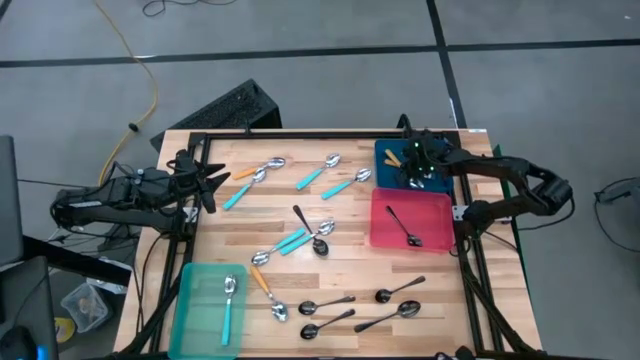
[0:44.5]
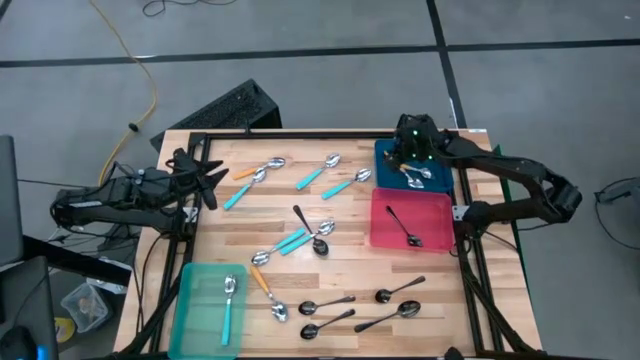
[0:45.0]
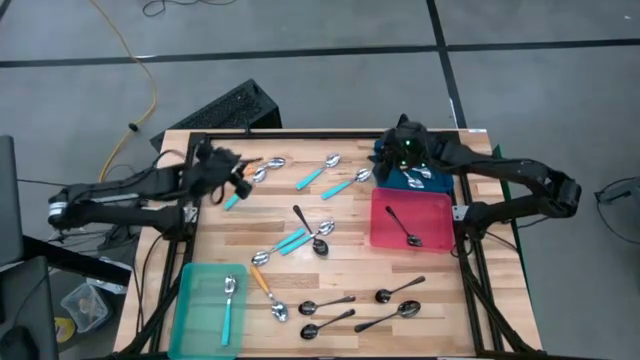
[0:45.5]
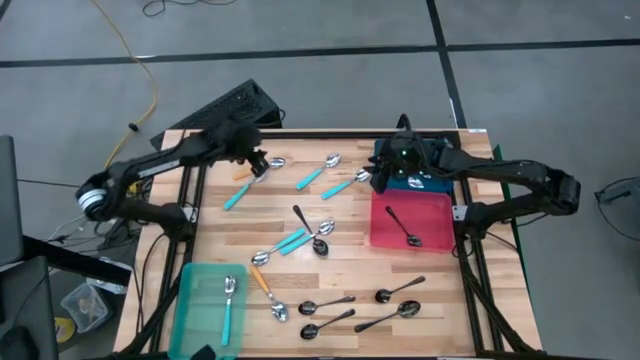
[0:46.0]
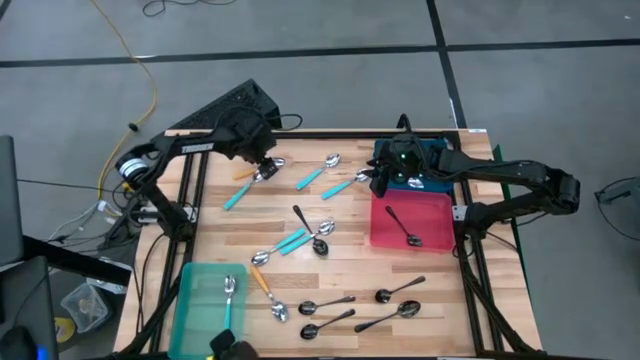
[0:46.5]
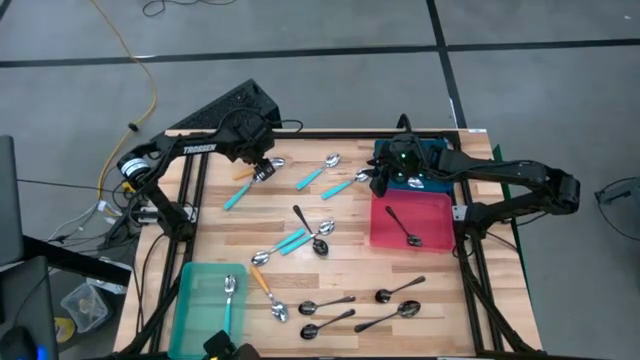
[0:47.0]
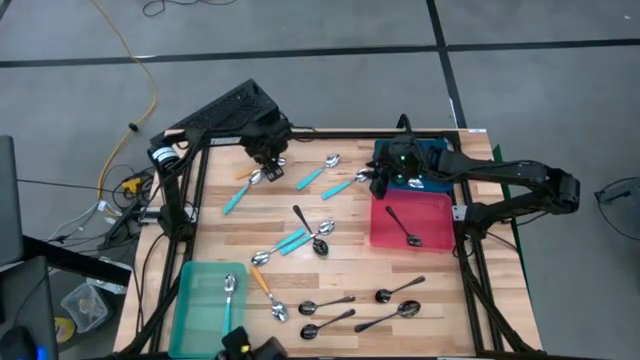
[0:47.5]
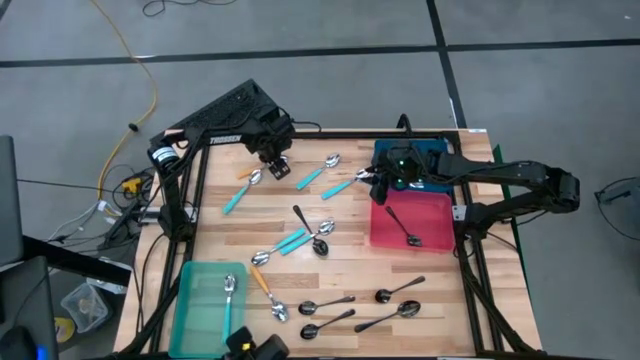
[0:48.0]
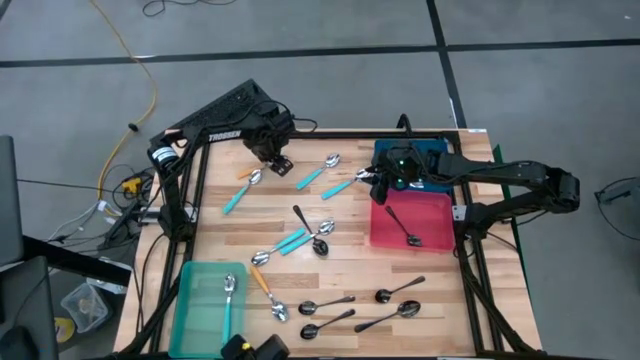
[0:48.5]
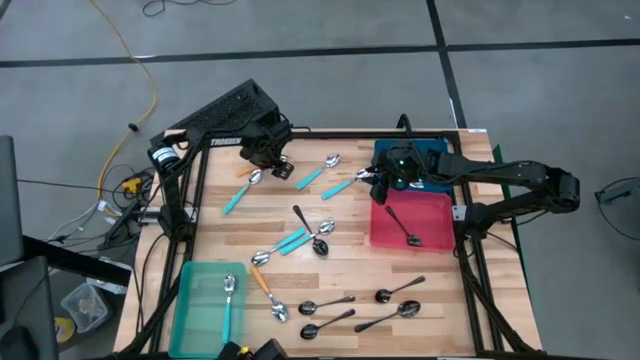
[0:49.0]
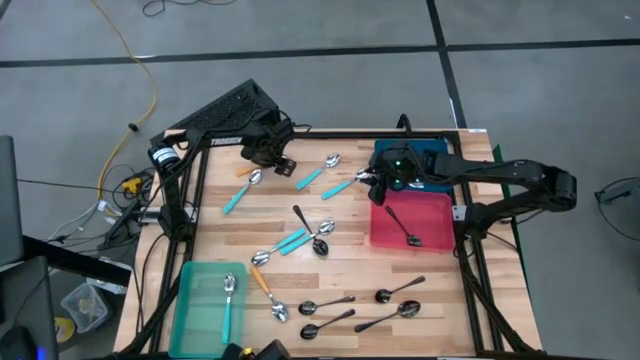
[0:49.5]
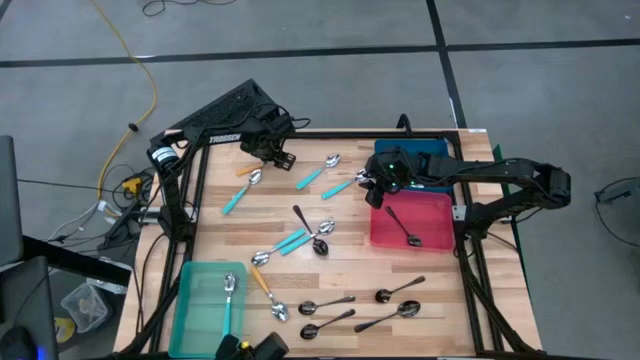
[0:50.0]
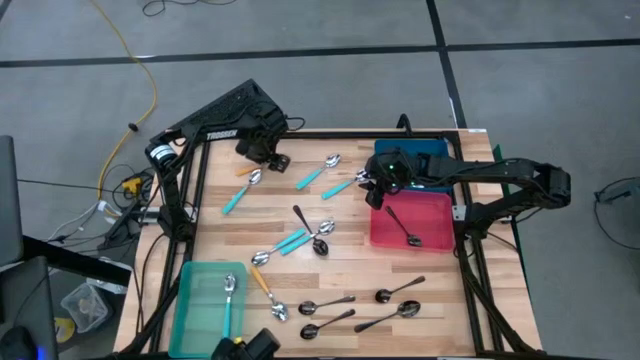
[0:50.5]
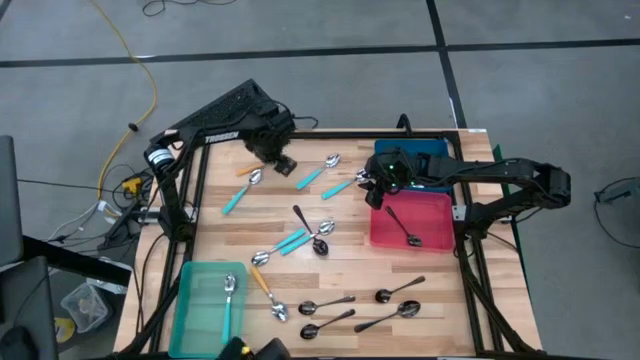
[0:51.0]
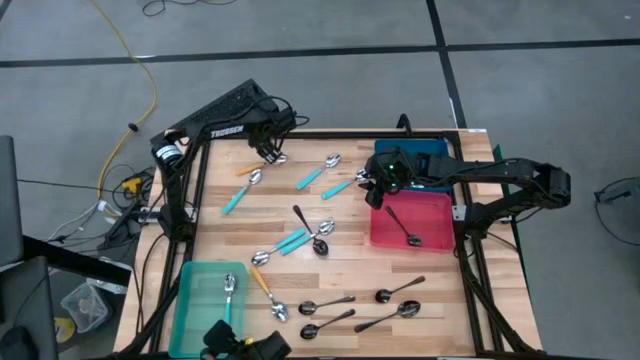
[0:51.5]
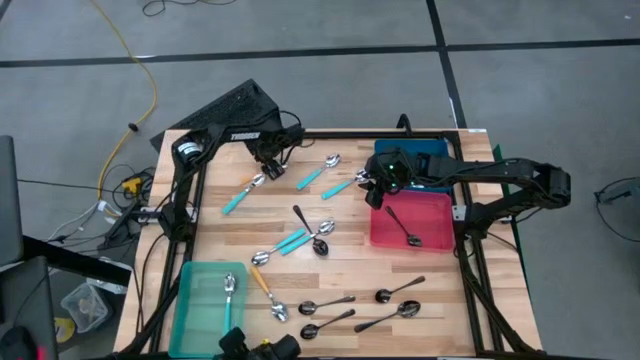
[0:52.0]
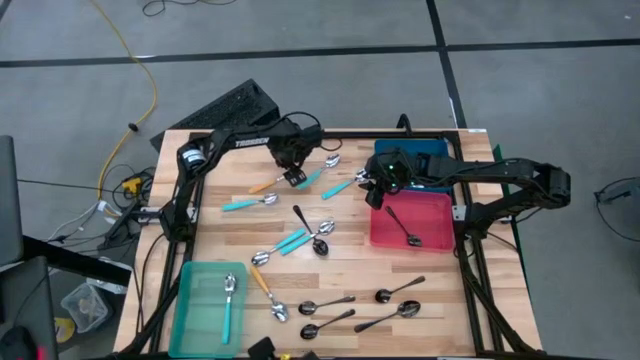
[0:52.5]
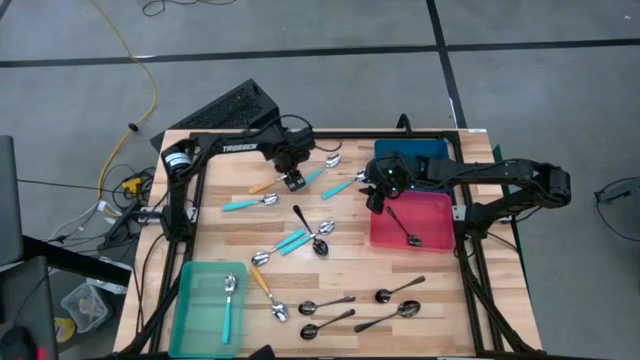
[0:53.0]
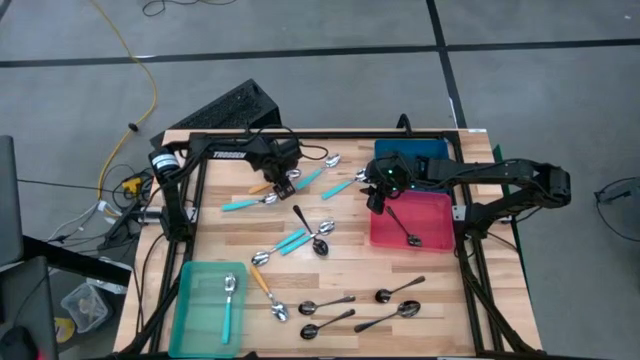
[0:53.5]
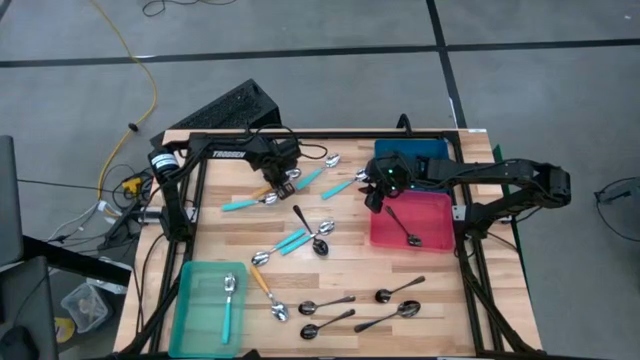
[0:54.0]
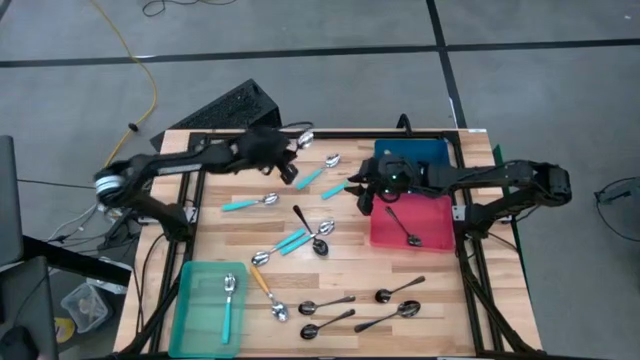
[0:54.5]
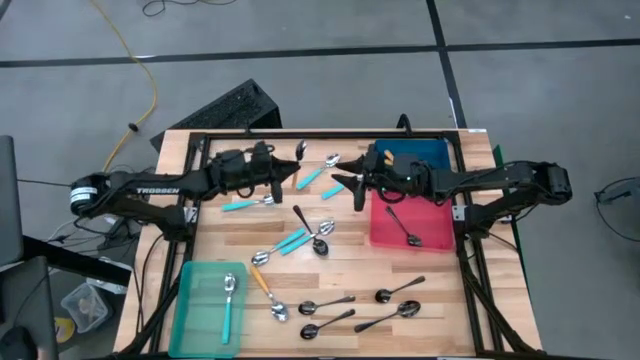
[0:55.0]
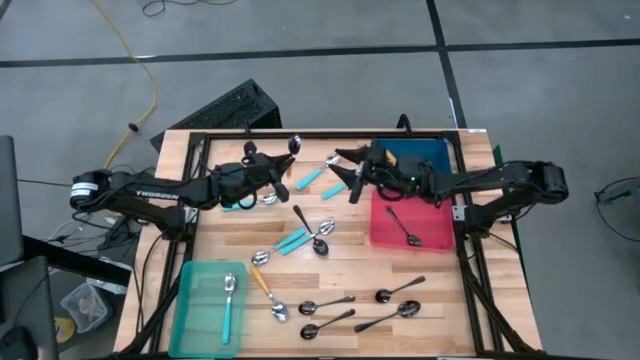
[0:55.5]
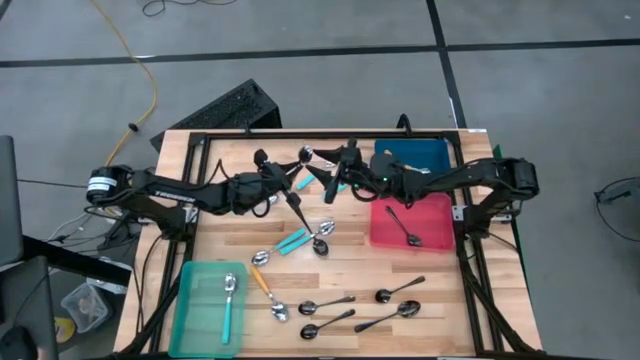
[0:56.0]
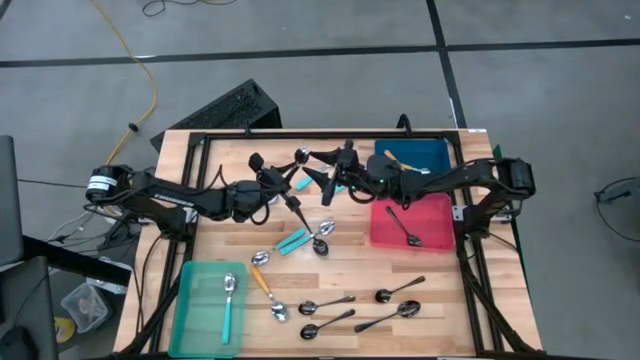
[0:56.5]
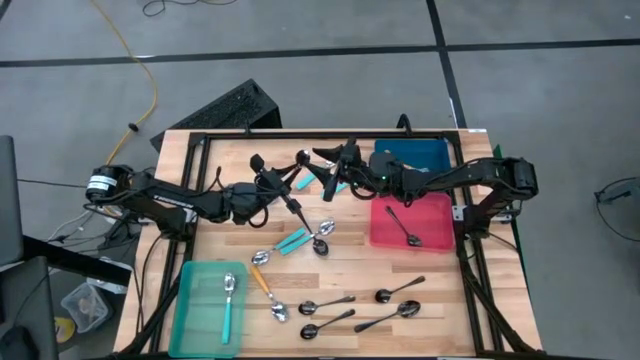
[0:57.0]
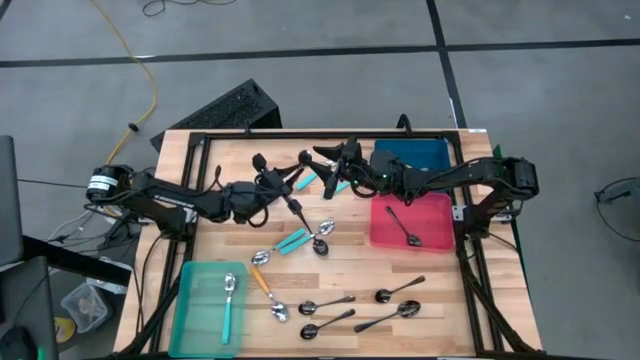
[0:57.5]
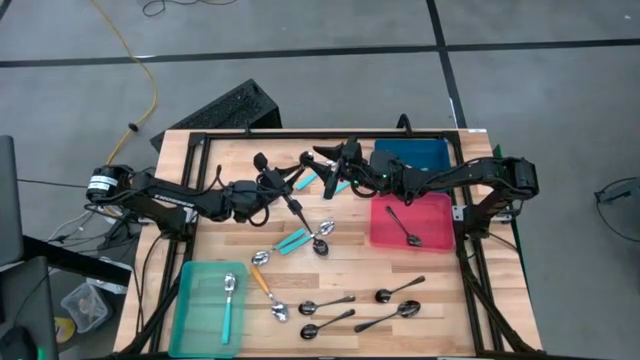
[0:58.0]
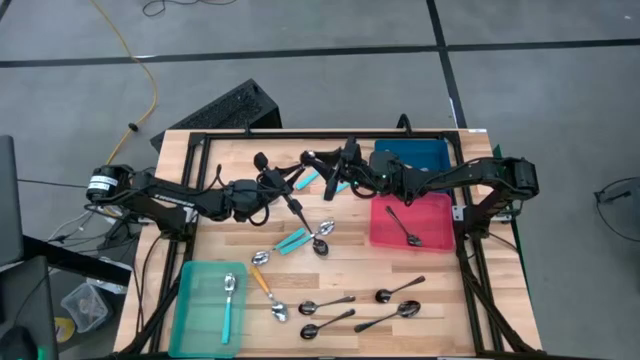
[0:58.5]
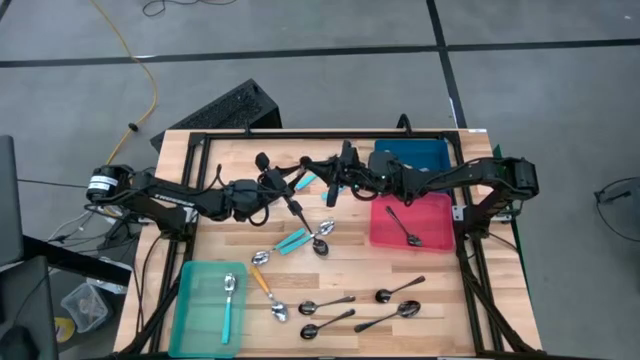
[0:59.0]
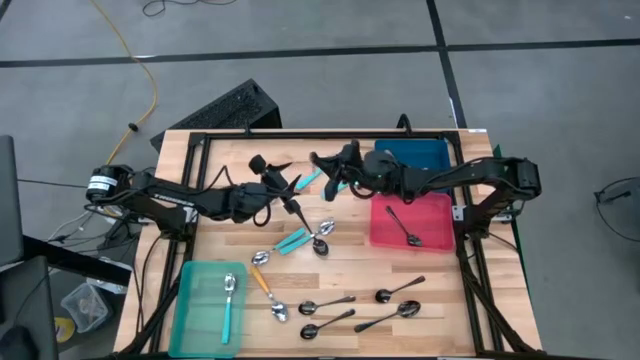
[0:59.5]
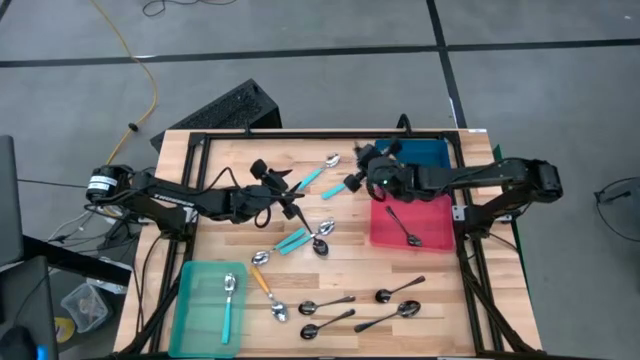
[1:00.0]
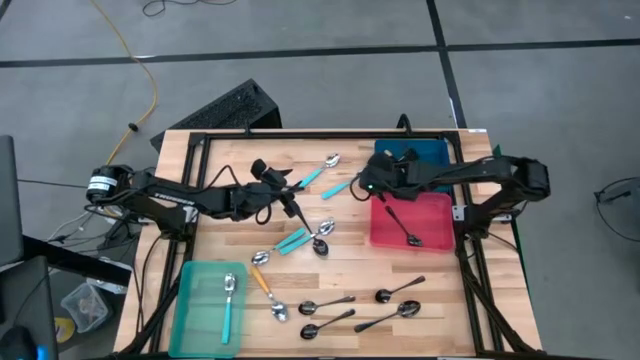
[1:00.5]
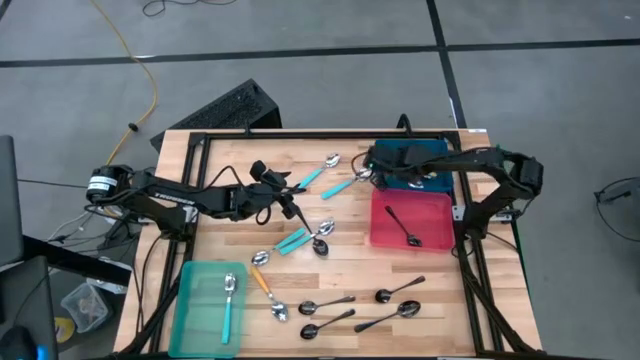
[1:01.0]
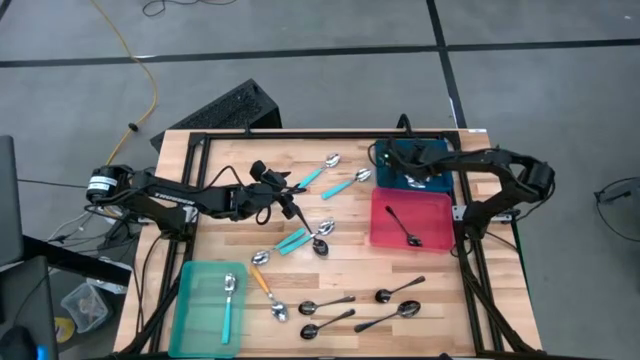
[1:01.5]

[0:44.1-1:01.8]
Task: Sort silverware by color (type)
Put the yellow spoon into the blue bin

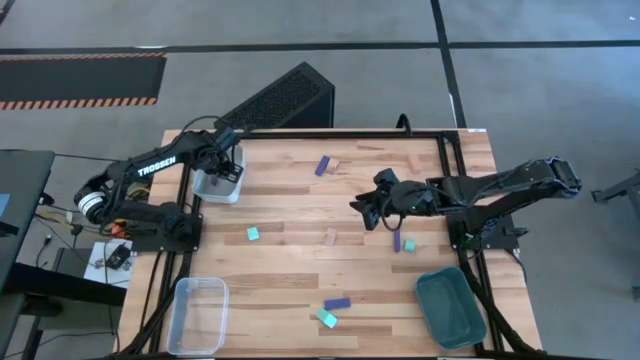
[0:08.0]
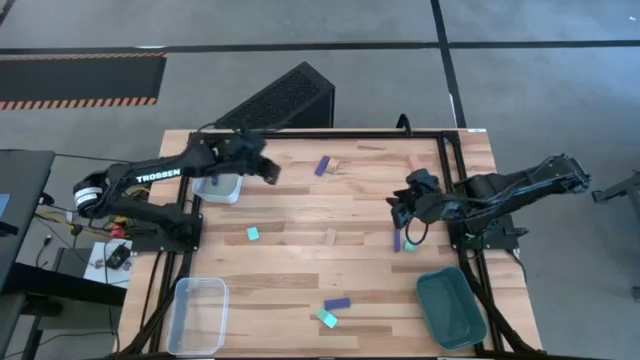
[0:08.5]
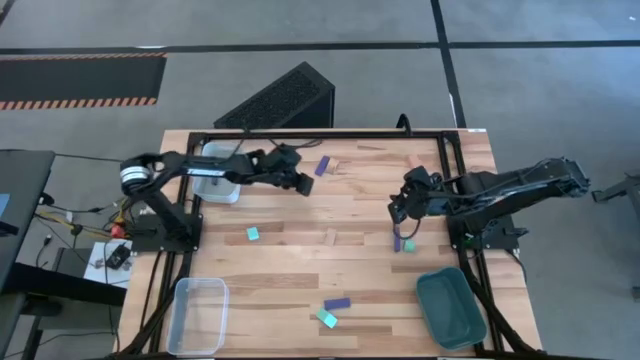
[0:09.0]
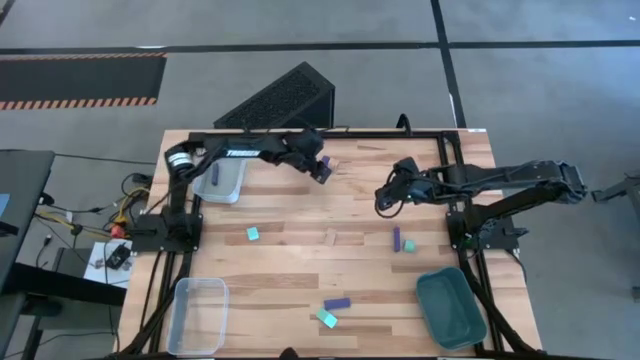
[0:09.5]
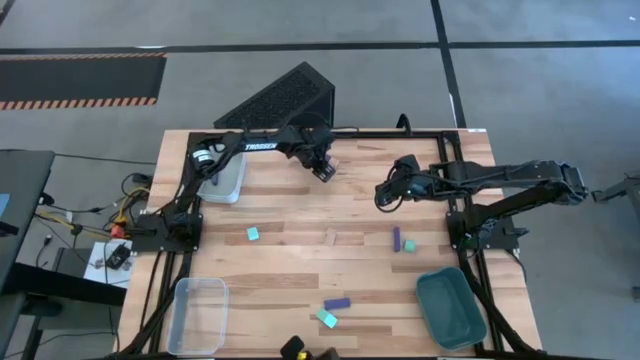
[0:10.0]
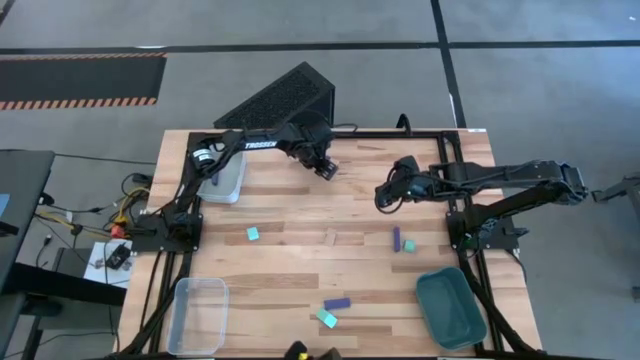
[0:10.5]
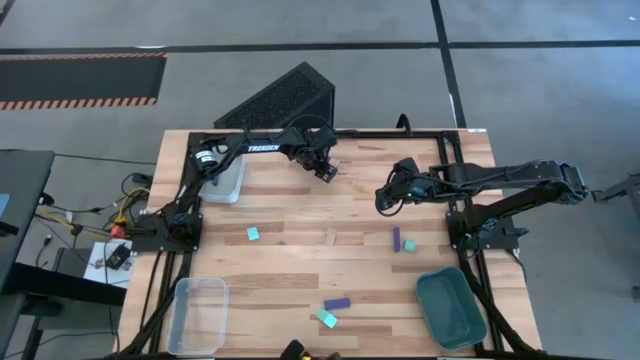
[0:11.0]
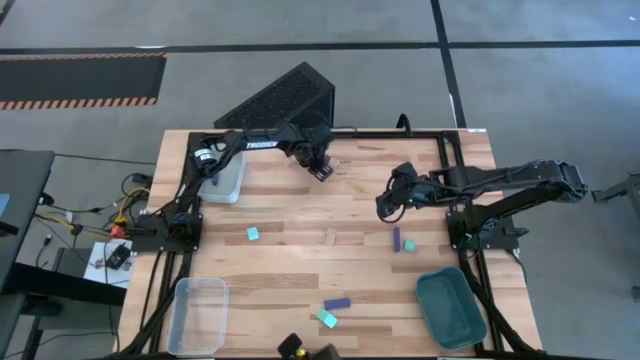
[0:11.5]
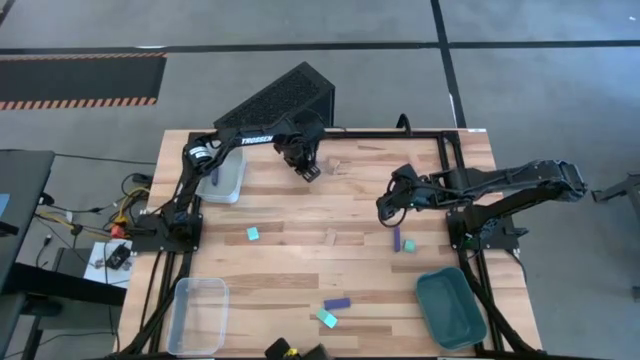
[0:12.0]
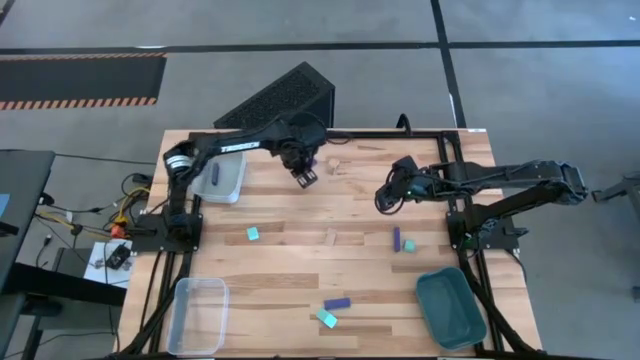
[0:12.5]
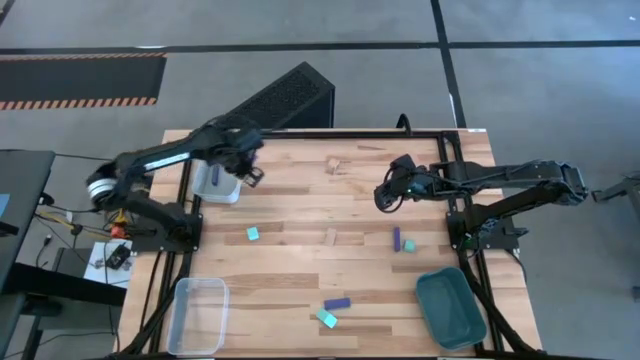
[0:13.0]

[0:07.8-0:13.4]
Task: Sort & place blocks by color
Put the top violet block into the white bin
